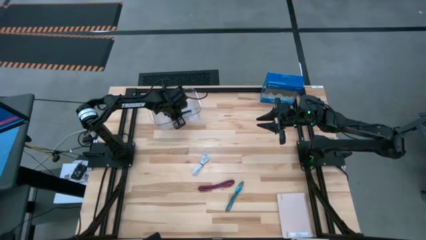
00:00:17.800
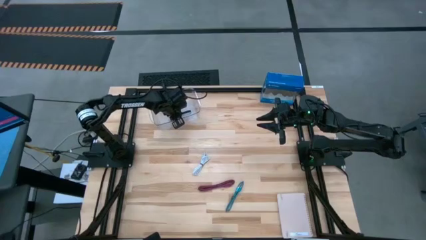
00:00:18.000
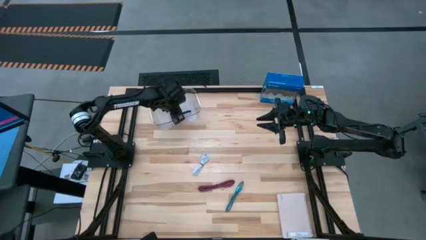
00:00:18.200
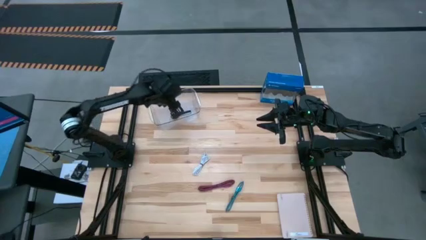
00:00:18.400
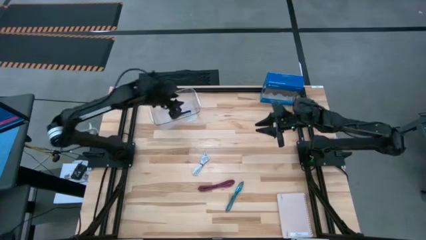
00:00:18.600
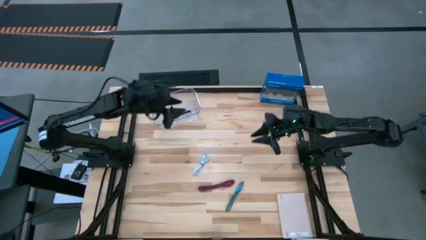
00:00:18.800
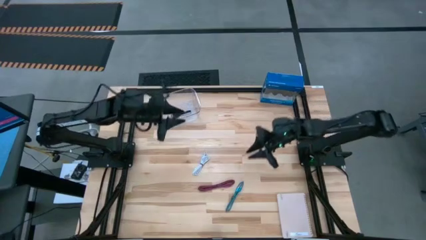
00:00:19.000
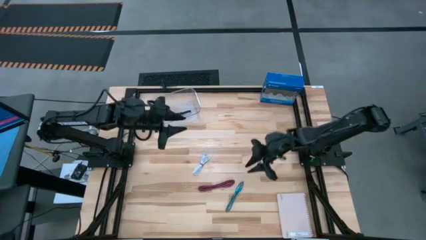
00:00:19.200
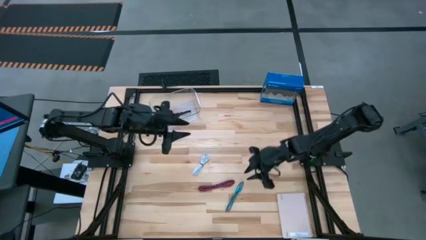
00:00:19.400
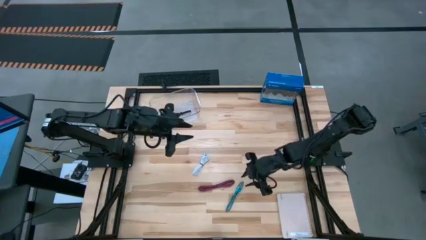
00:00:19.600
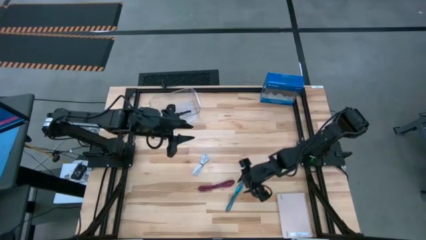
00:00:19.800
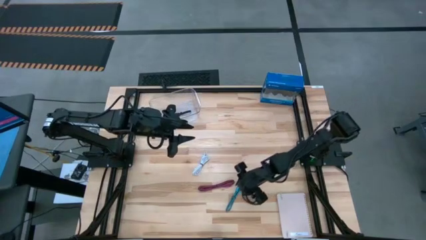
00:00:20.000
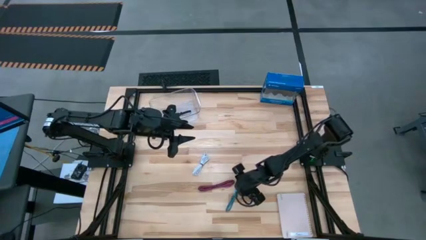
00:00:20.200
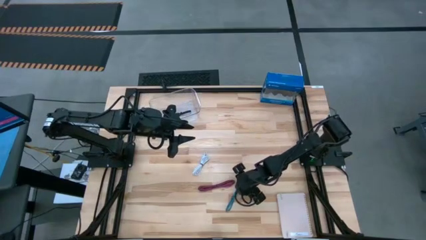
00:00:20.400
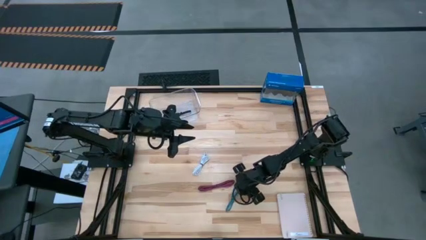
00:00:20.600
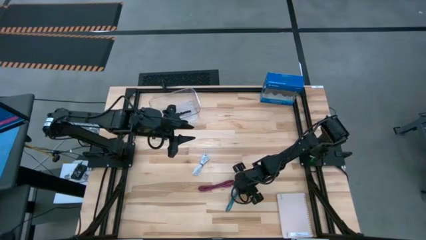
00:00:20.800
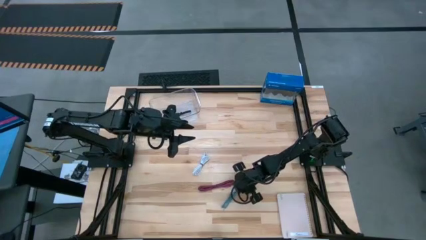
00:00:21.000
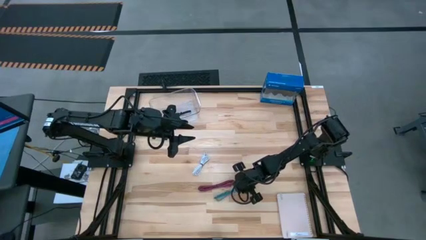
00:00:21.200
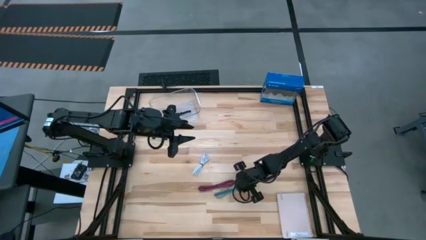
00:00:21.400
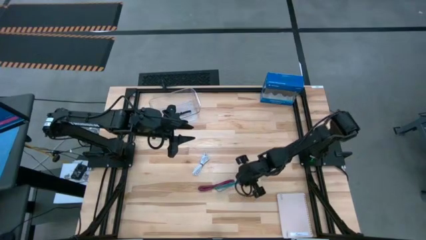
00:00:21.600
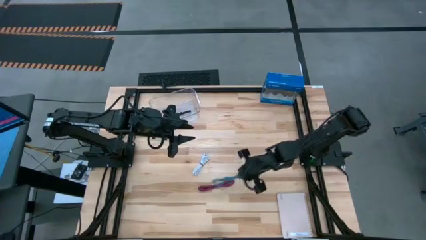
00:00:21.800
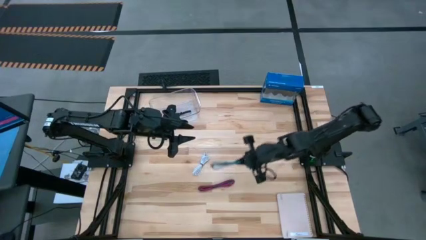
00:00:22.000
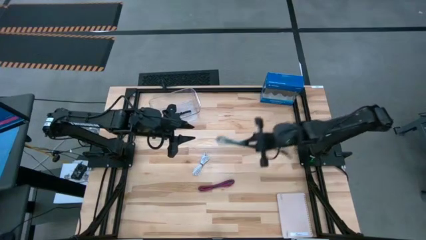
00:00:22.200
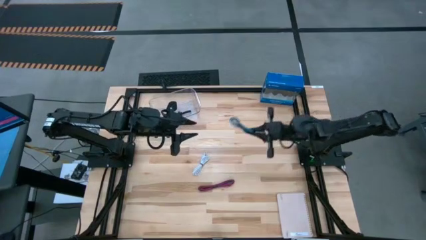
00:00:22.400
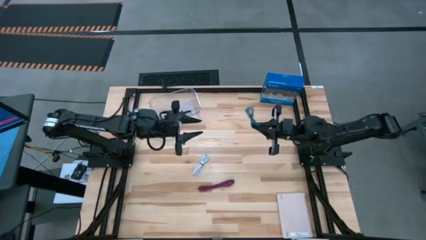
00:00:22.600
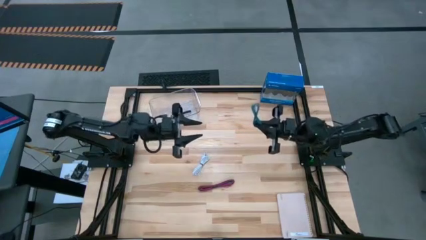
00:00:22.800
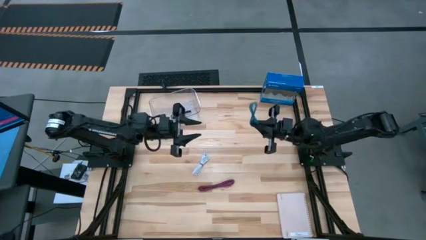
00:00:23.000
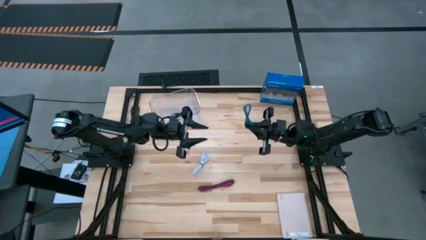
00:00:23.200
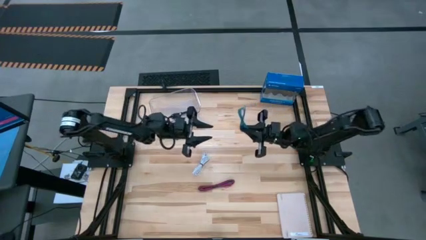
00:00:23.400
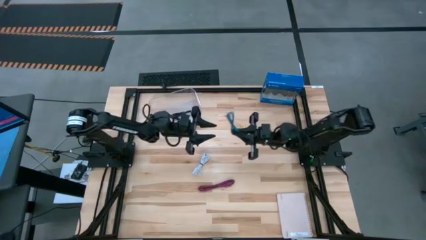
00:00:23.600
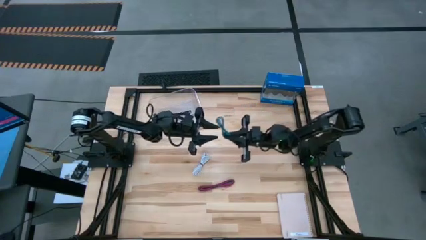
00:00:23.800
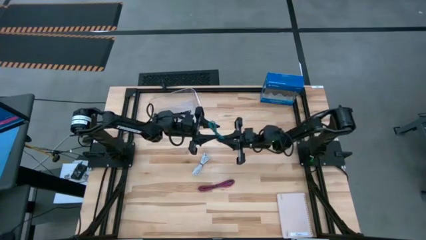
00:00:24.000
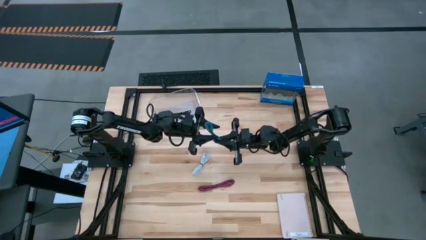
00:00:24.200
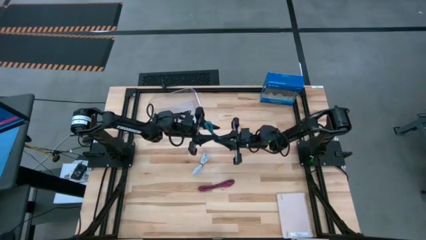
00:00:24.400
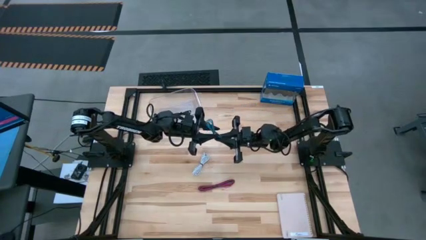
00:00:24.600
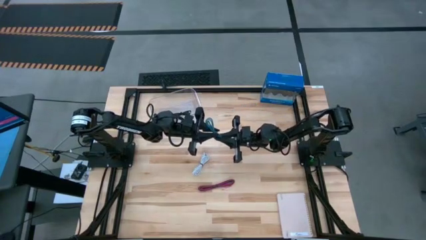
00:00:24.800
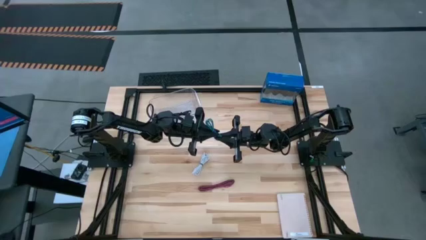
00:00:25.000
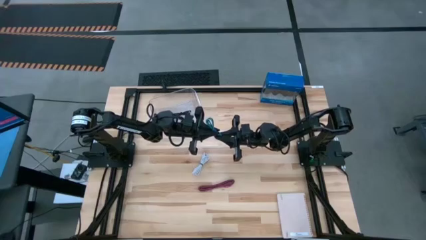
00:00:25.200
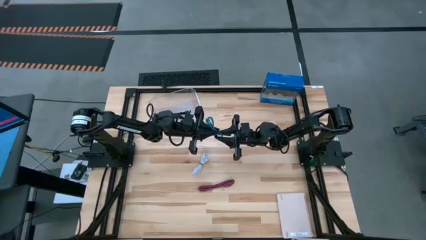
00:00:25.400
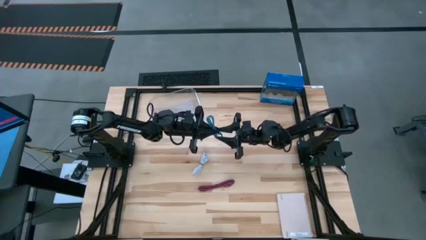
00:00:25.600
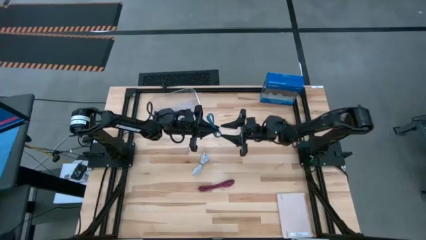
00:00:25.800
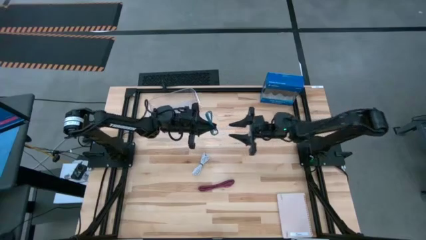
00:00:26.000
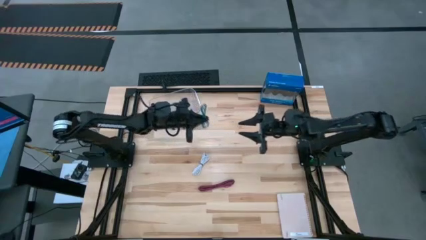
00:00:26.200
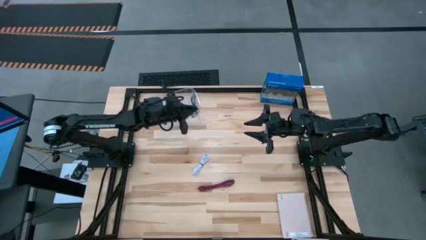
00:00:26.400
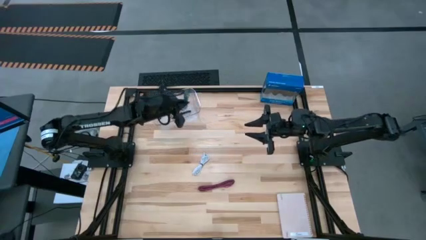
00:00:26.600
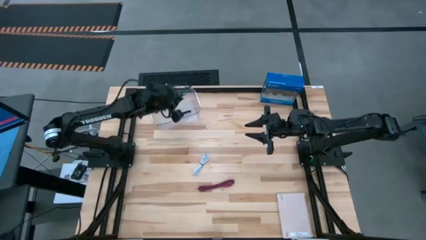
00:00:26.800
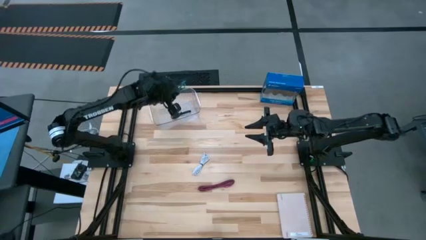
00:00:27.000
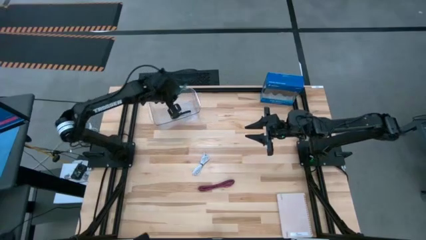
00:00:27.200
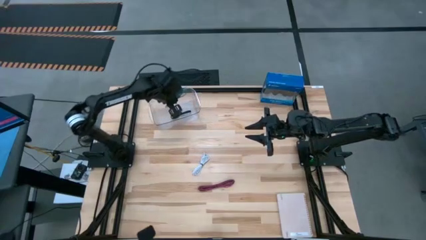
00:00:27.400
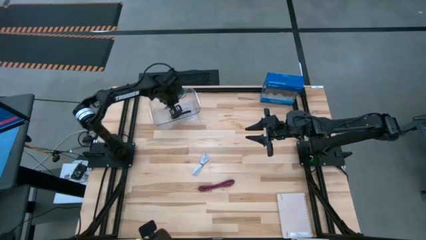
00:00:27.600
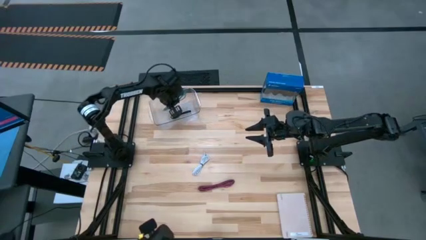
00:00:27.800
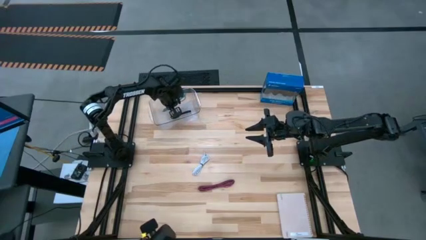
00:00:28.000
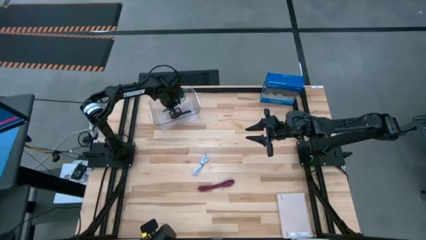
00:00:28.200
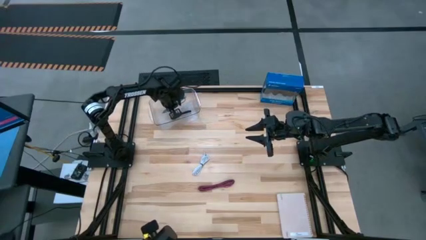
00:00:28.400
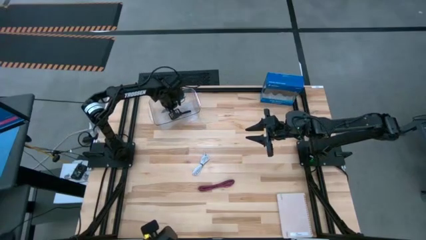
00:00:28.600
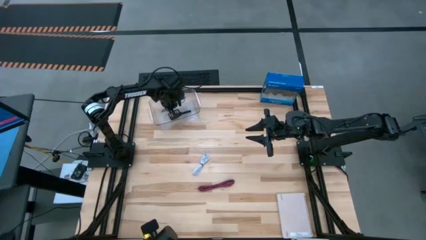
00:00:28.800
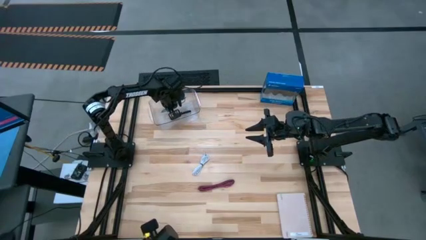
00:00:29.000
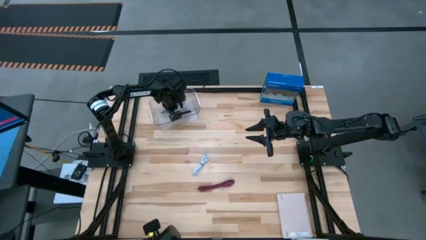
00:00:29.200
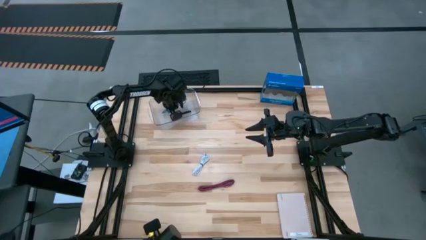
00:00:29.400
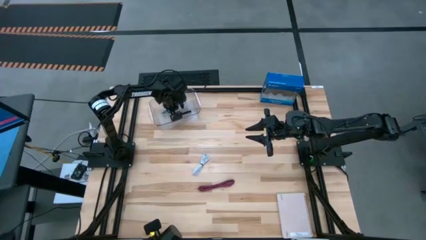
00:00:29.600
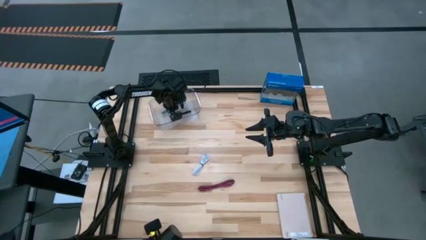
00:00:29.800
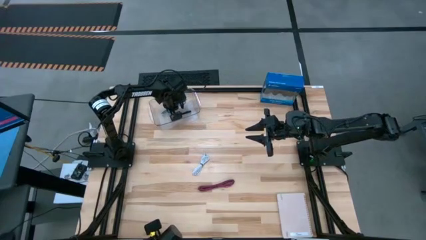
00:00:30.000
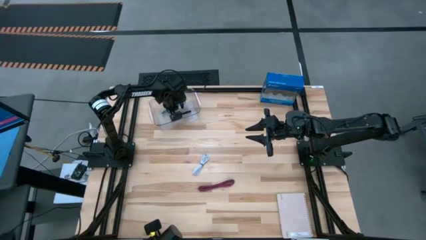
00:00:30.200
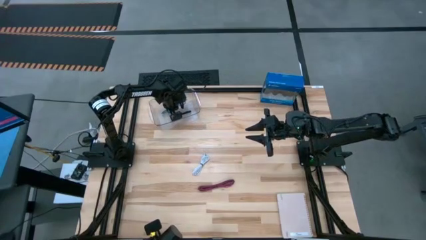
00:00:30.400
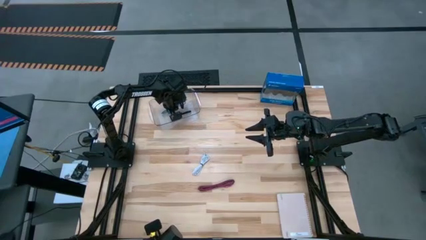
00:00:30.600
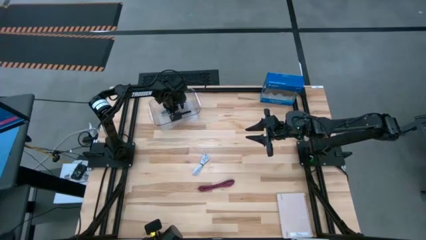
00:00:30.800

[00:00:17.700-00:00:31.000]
Task: Pick and place USB-C Cables
Put the blue charger cable into the transparent bin
